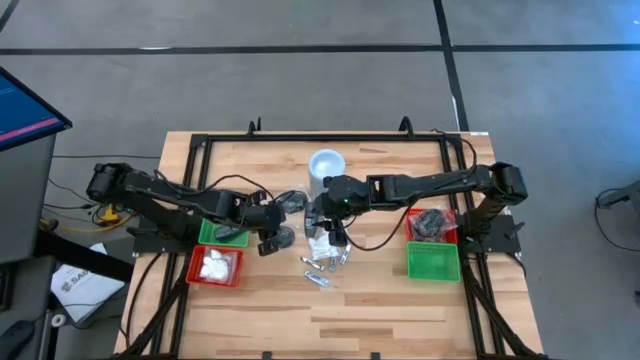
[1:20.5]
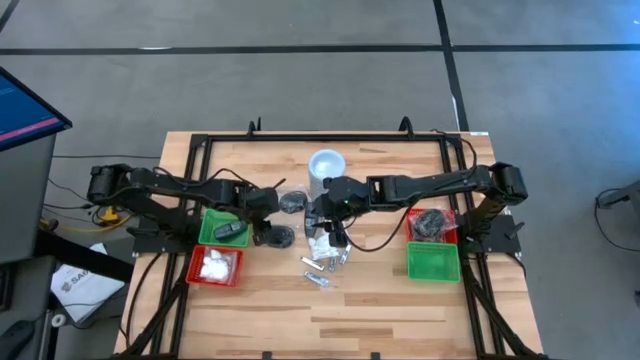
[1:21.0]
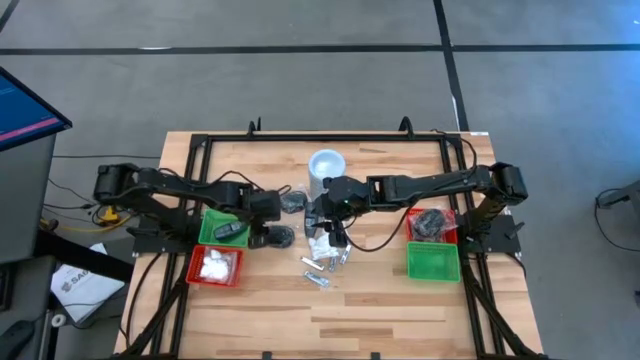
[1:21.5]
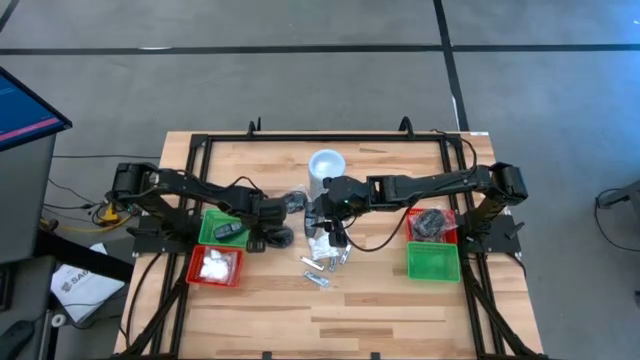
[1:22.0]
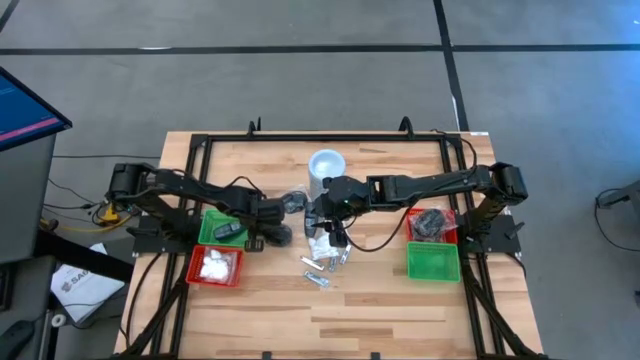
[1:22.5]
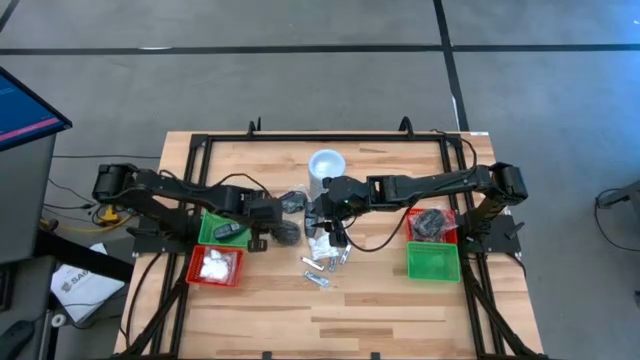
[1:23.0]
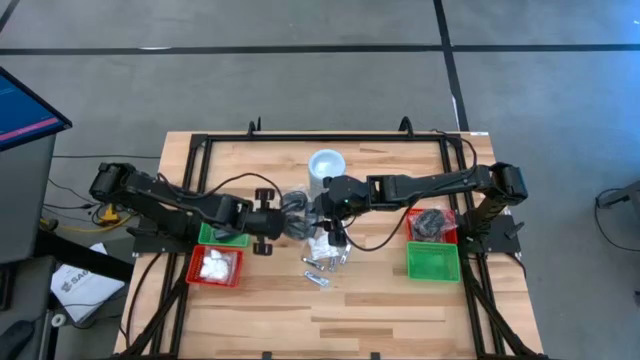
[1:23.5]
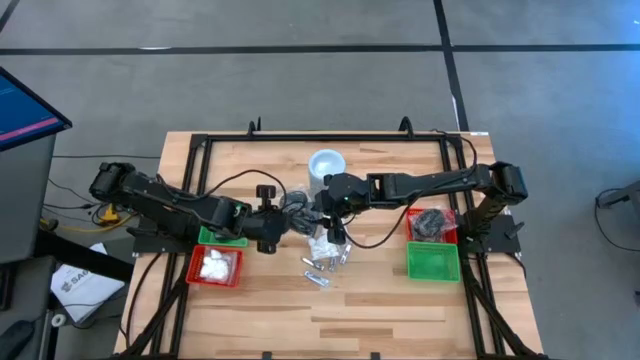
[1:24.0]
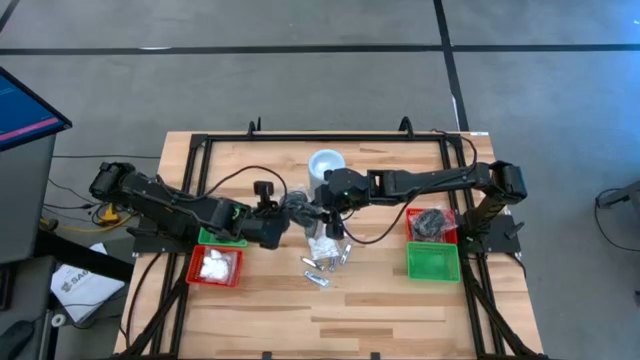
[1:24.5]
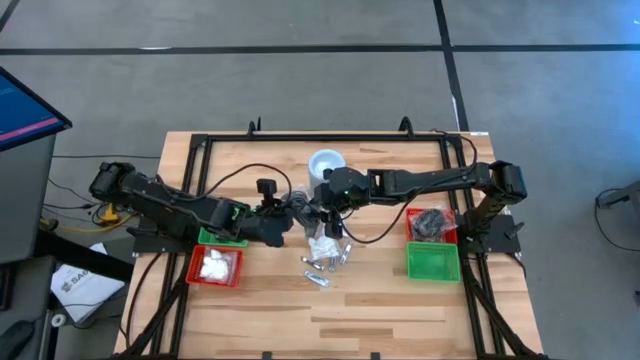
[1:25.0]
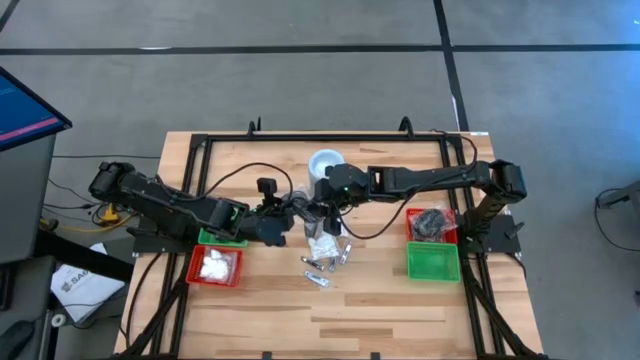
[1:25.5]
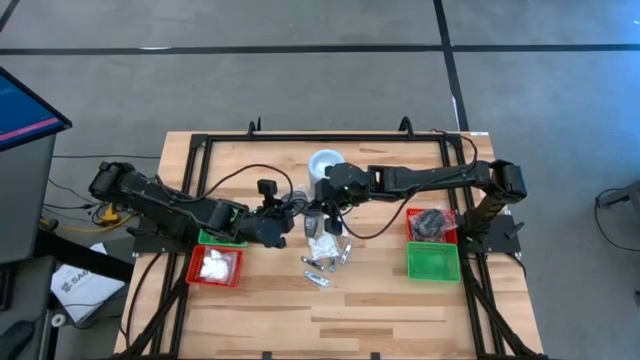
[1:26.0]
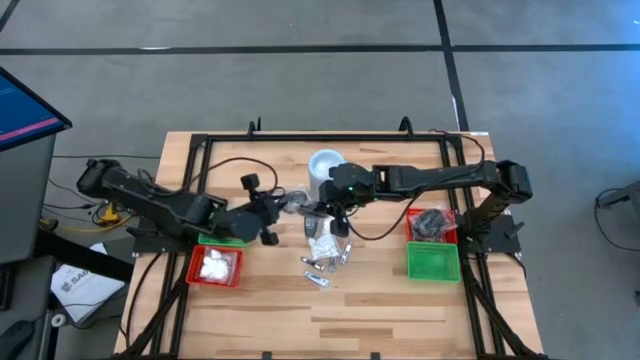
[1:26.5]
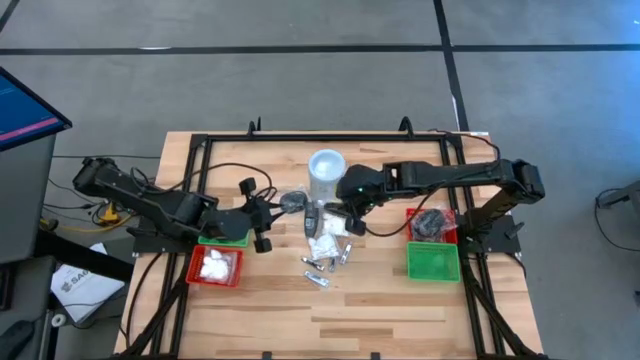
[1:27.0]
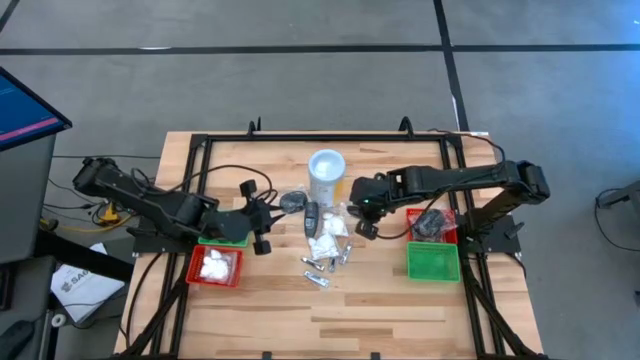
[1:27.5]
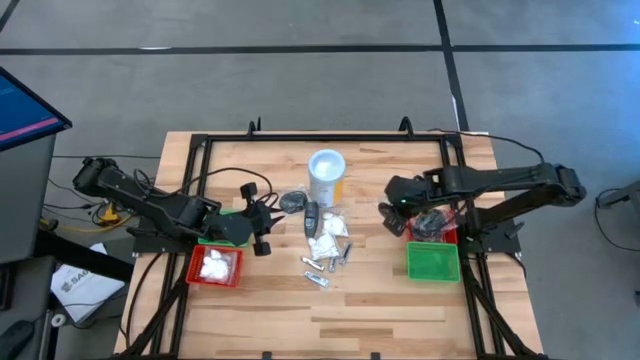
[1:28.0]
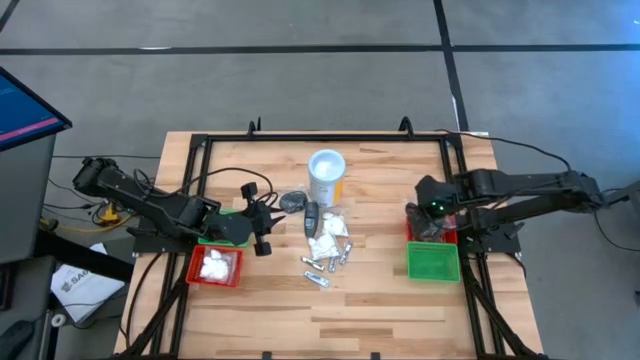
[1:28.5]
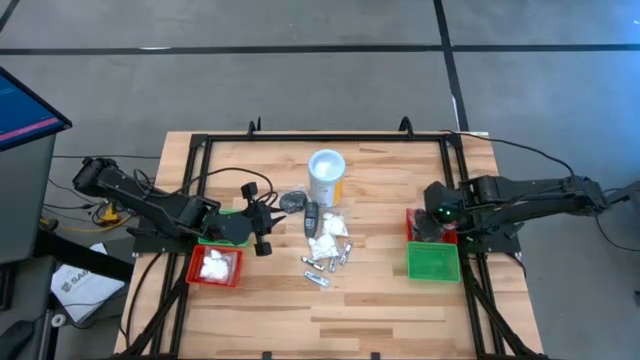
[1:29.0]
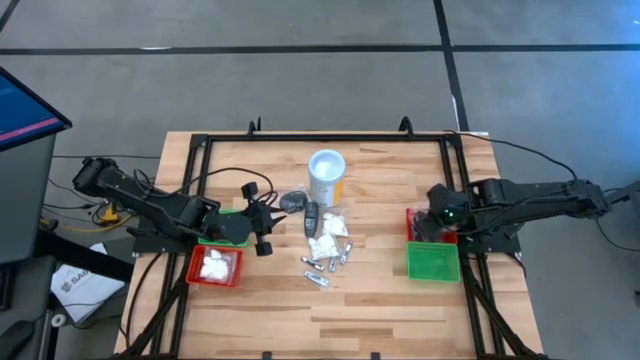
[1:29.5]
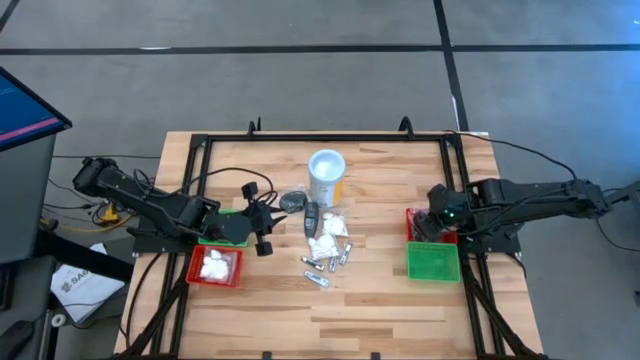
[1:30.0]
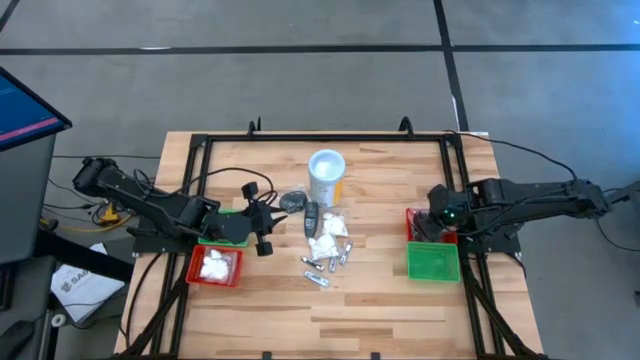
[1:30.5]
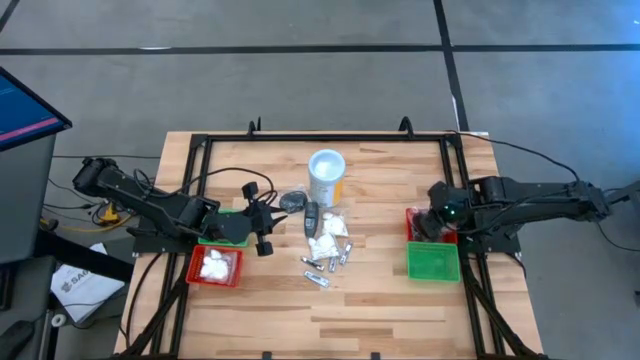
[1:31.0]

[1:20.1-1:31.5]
Task: Pick & Place Travel size toiletries
Put the hairbrush into the right red bin

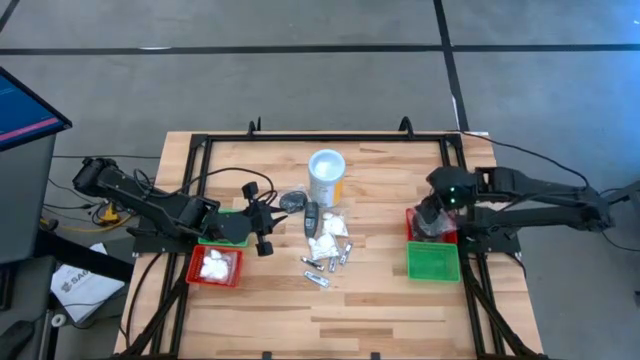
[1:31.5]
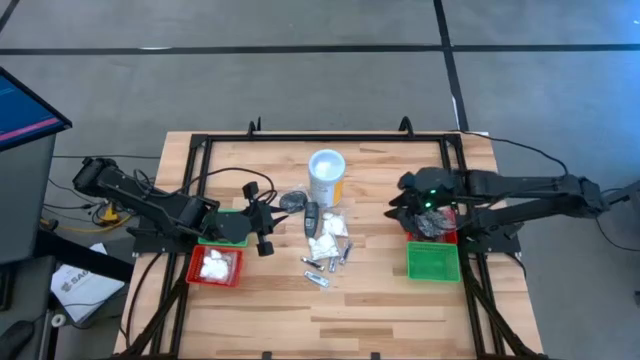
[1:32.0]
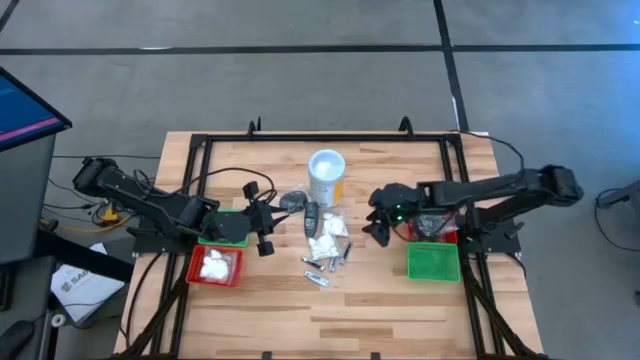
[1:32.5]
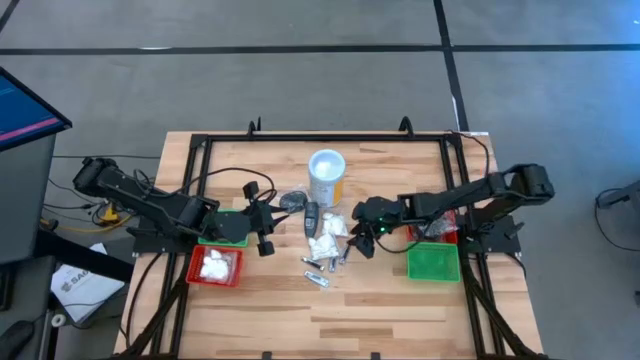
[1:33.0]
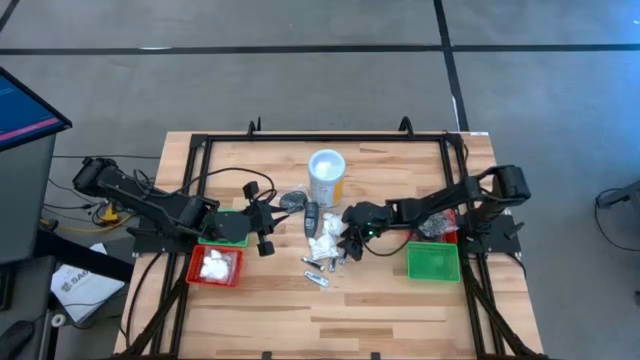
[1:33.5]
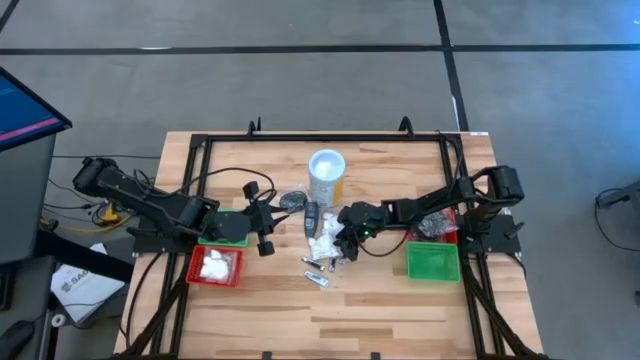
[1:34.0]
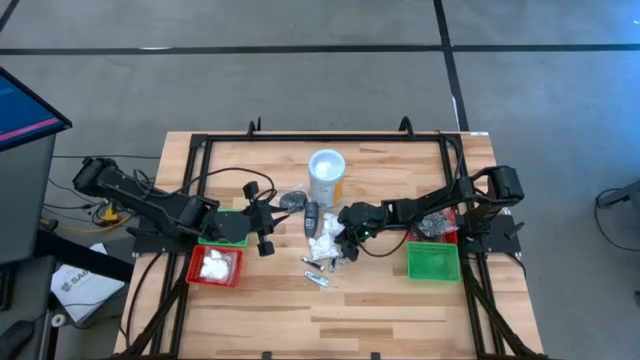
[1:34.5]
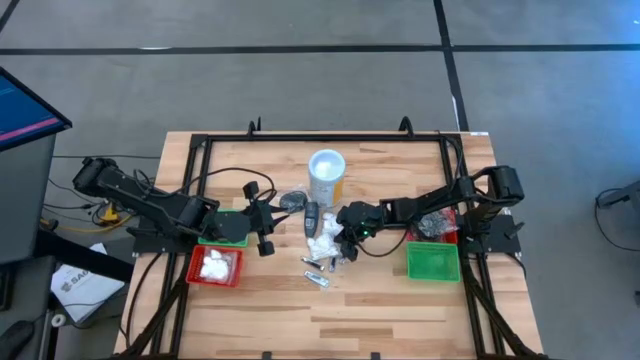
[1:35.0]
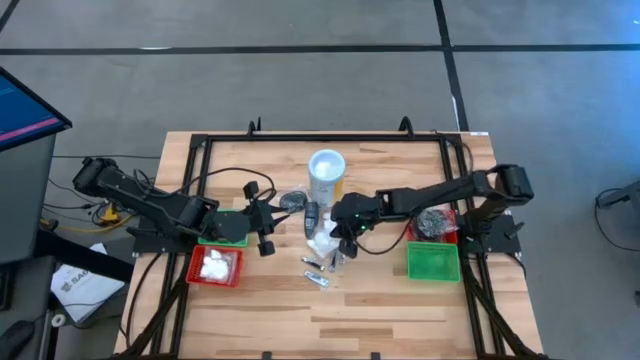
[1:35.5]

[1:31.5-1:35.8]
Put the cotton pack into the left red bin

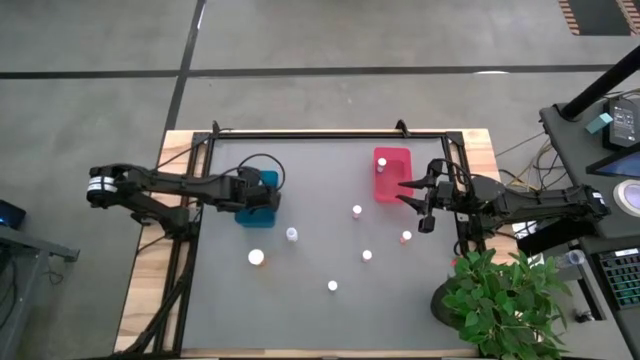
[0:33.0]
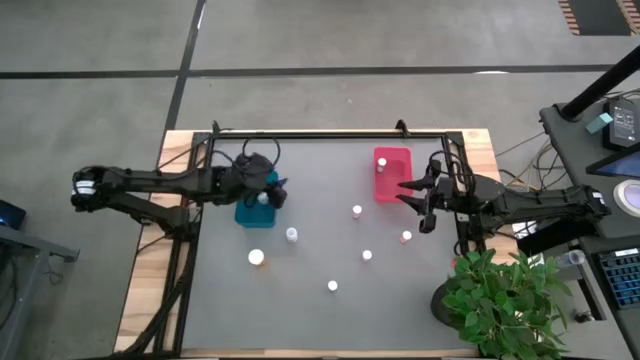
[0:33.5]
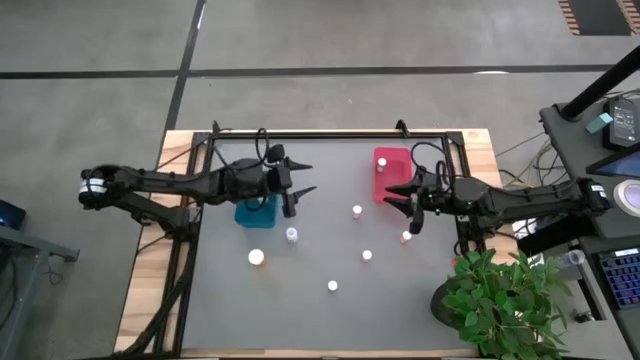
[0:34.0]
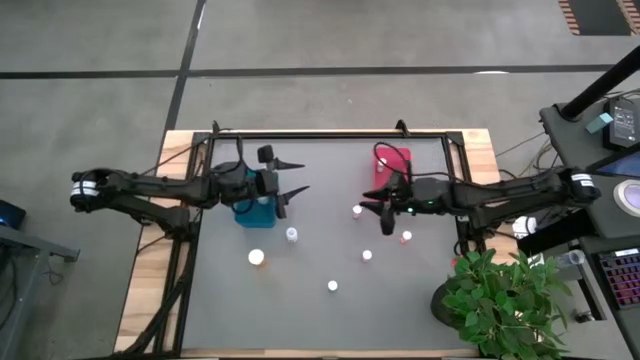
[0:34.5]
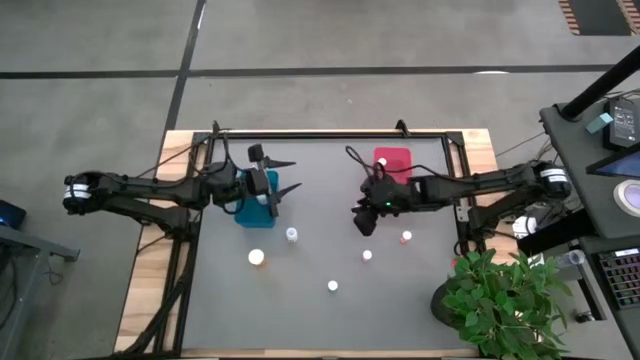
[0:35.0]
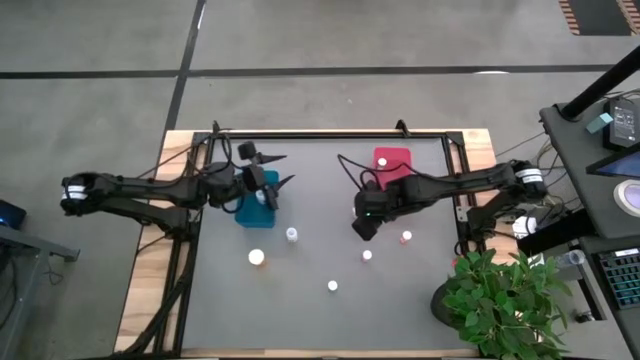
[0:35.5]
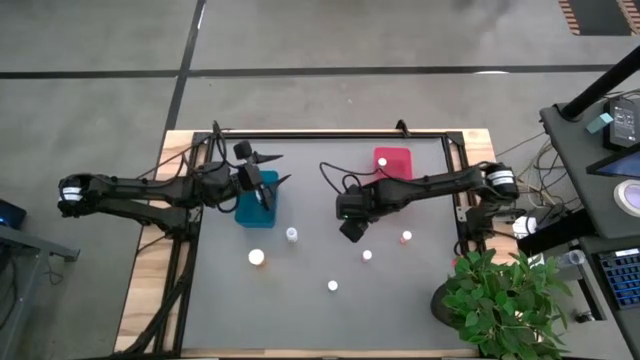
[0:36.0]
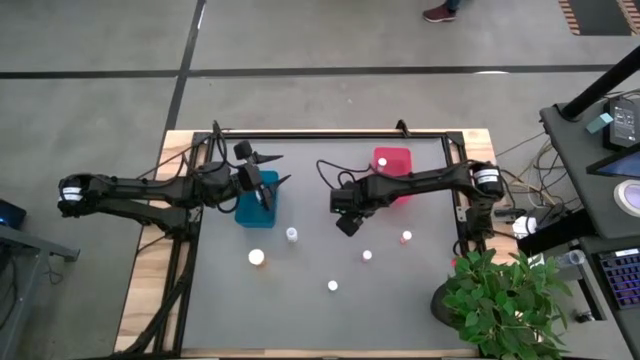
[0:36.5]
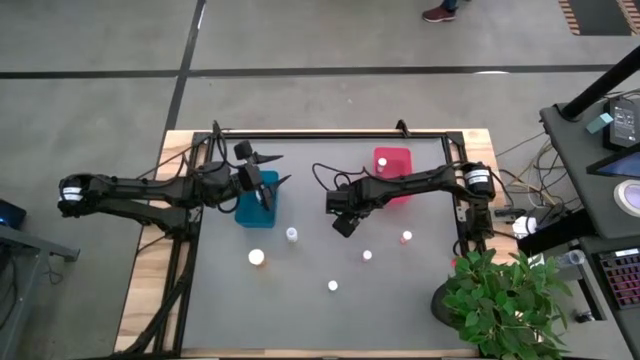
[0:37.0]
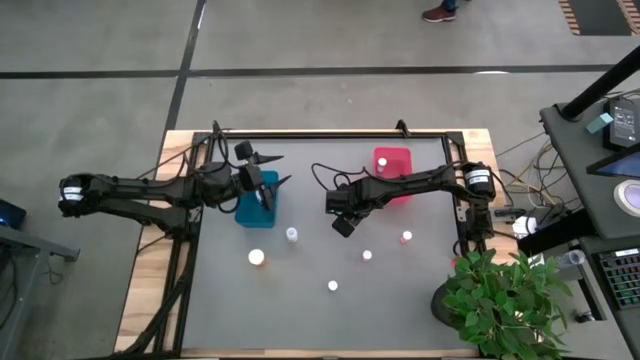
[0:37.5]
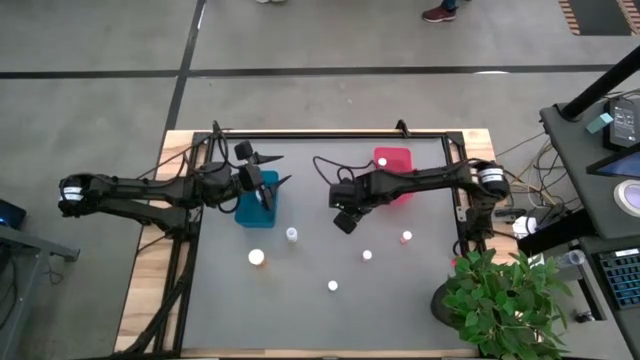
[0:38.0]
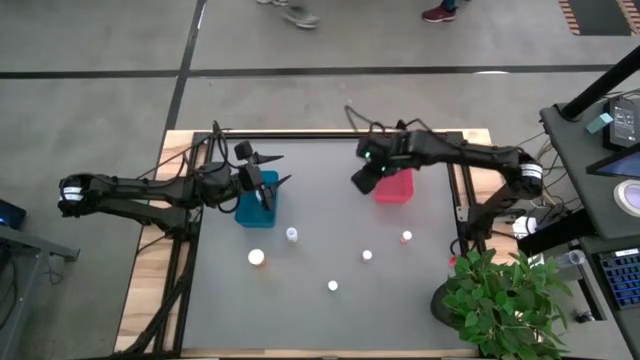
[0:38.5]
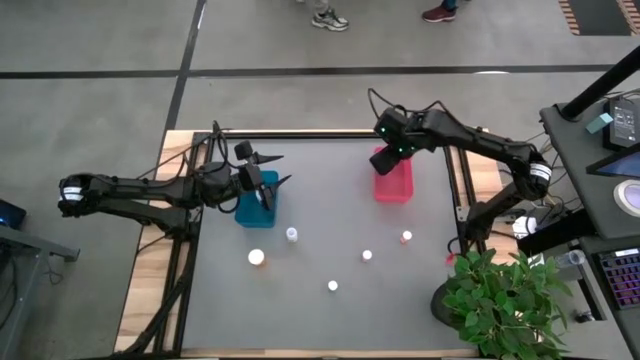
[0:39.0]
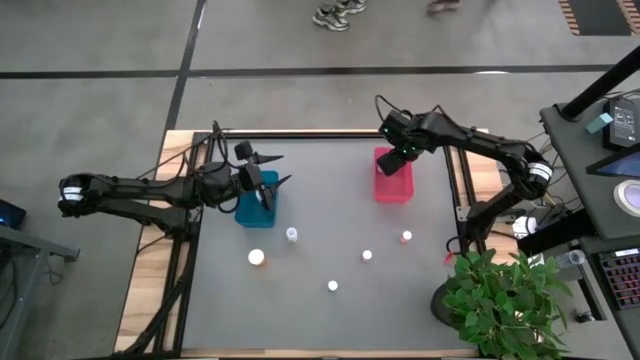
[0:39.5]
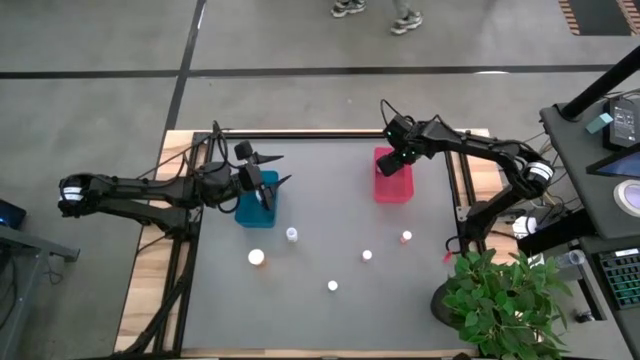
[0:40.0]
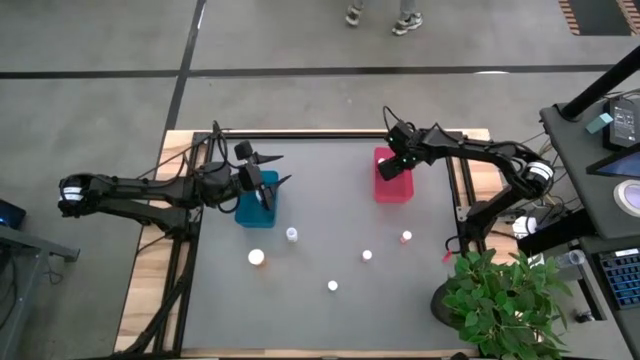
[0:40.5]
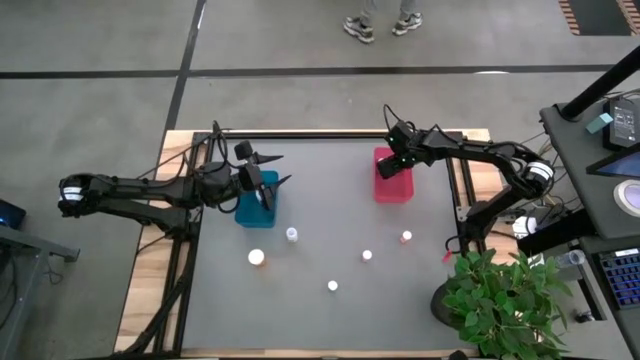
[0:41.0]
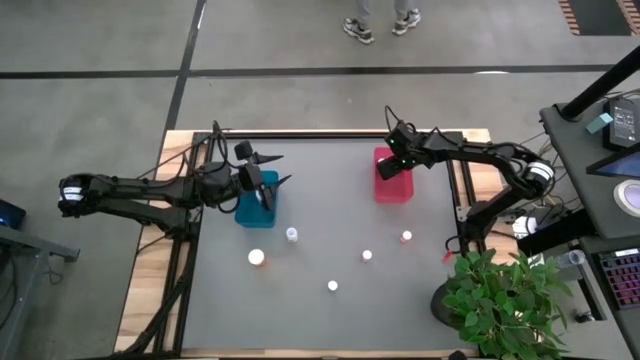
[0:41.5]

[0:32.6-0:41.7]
Task: Pick and place medicine bottles into bin by pill shape (circle, oval)
Put the top pink tablet bottle into the red bin
